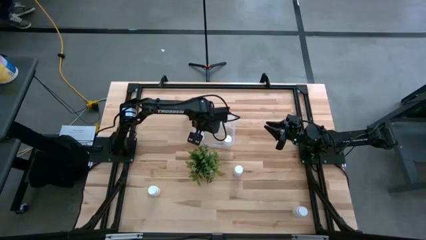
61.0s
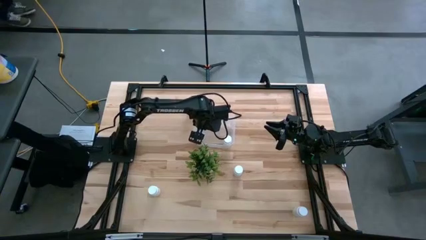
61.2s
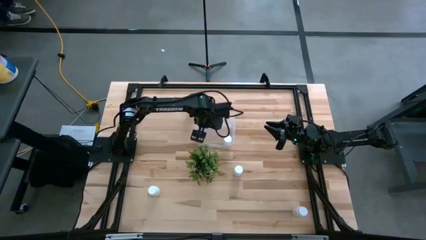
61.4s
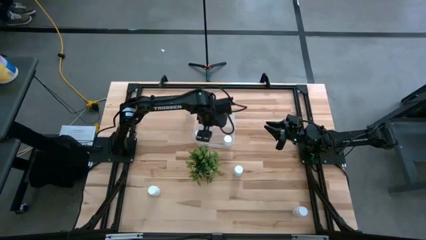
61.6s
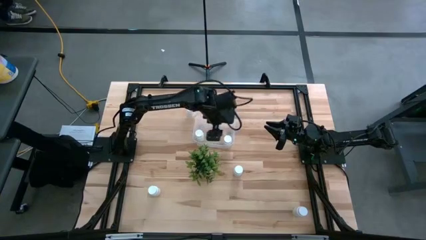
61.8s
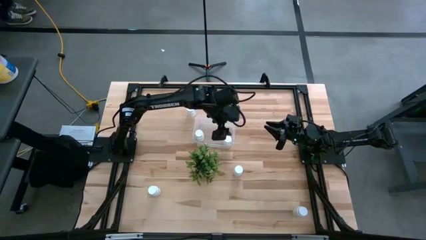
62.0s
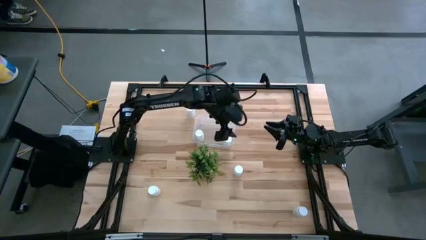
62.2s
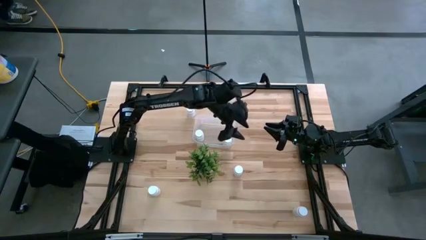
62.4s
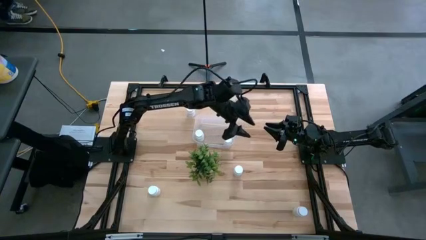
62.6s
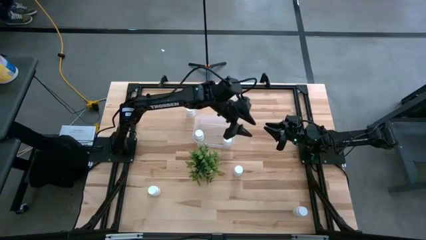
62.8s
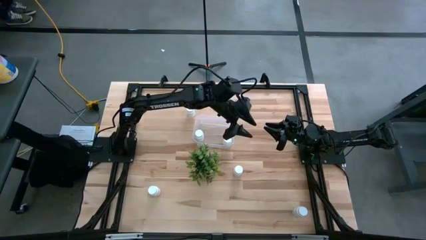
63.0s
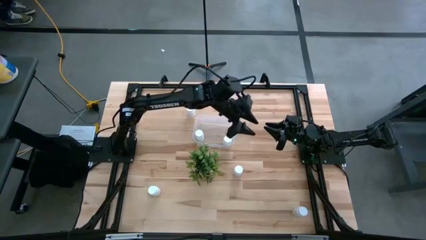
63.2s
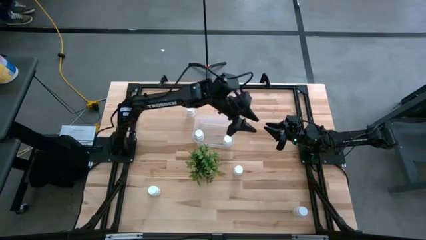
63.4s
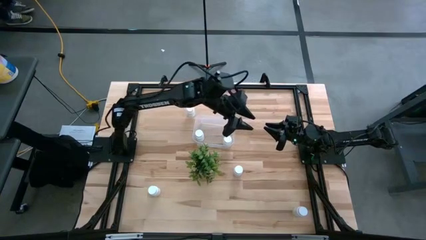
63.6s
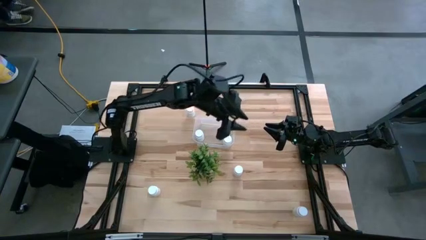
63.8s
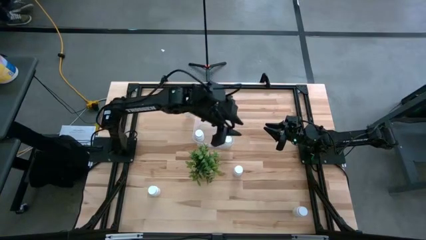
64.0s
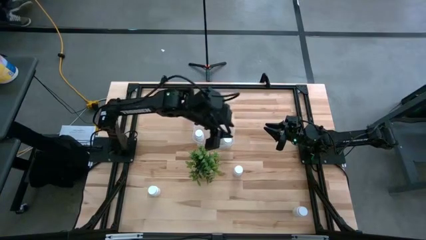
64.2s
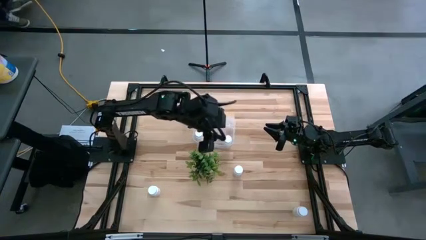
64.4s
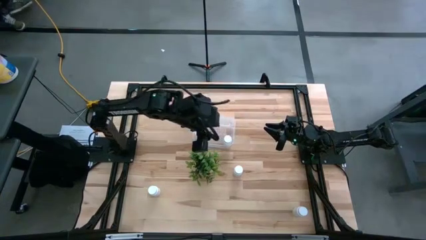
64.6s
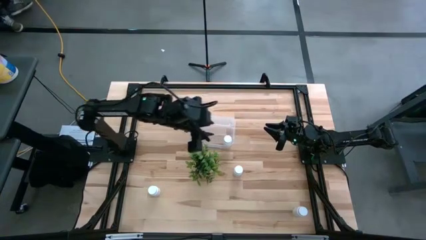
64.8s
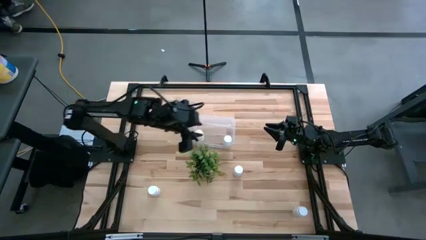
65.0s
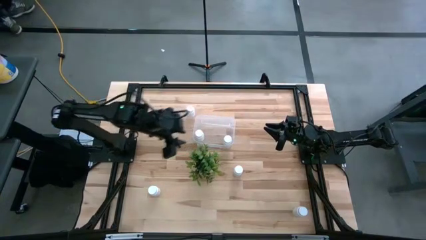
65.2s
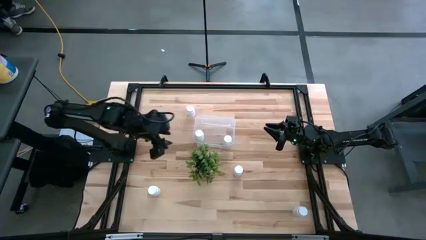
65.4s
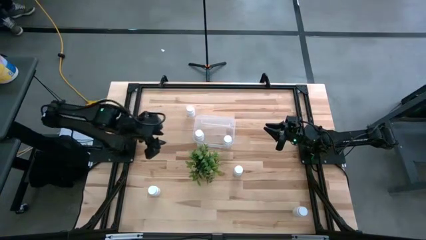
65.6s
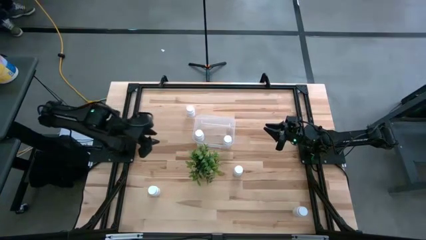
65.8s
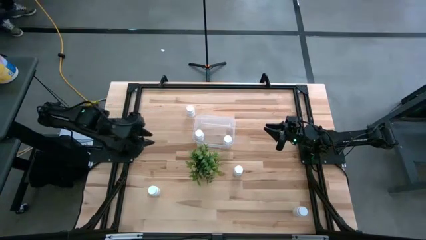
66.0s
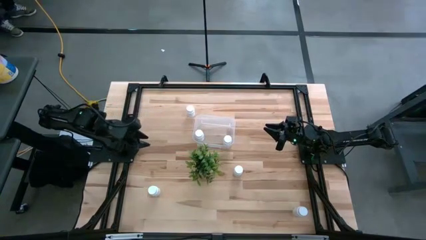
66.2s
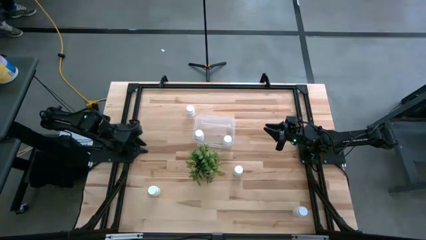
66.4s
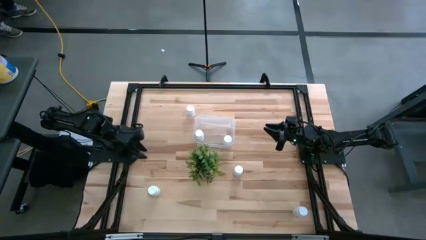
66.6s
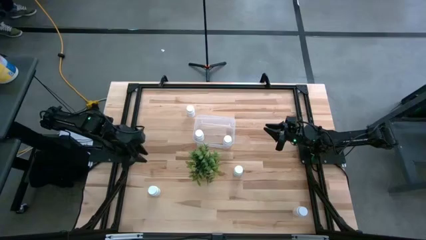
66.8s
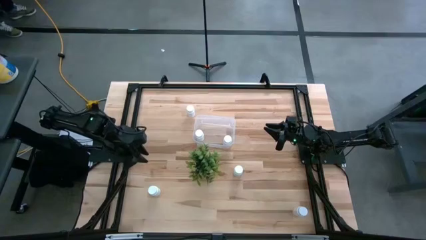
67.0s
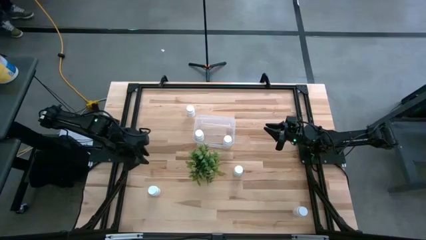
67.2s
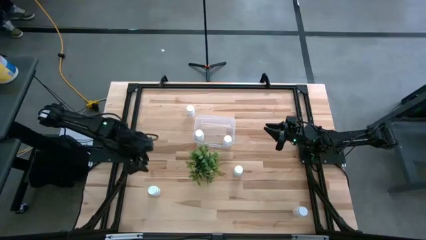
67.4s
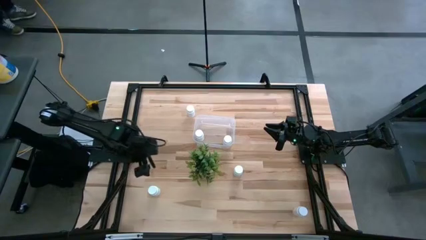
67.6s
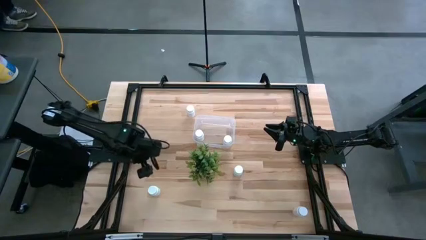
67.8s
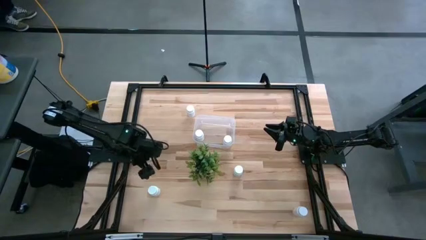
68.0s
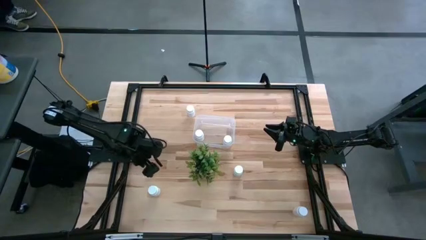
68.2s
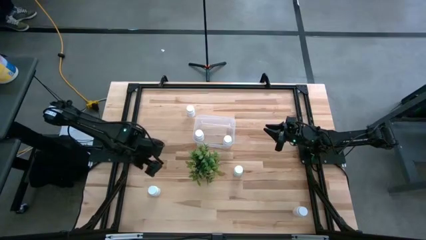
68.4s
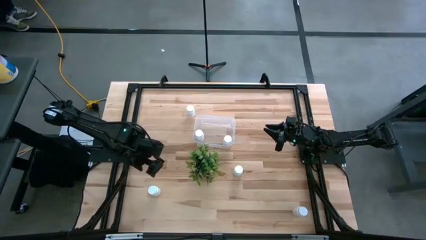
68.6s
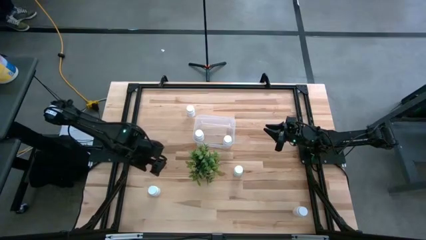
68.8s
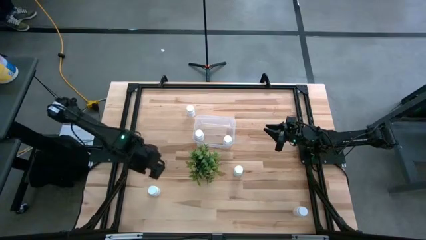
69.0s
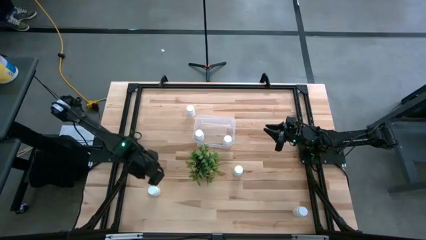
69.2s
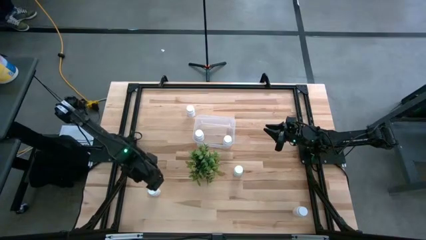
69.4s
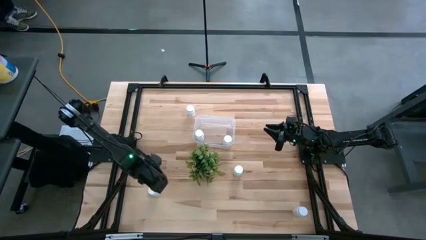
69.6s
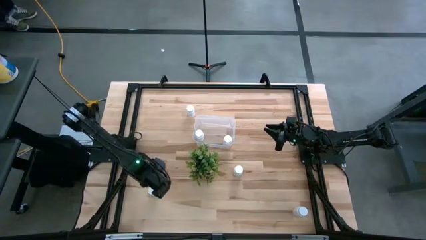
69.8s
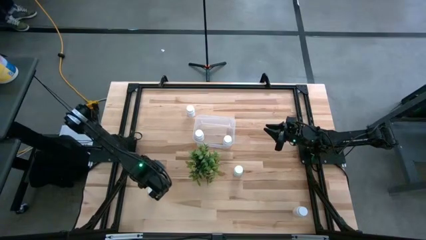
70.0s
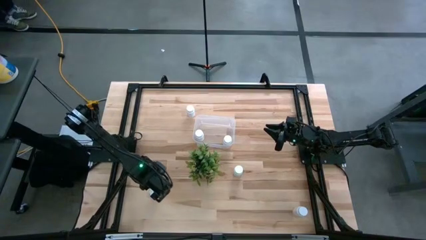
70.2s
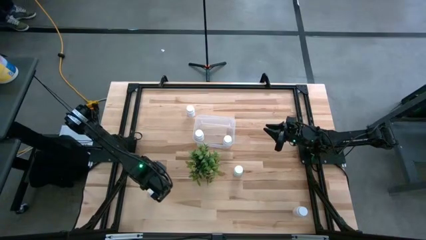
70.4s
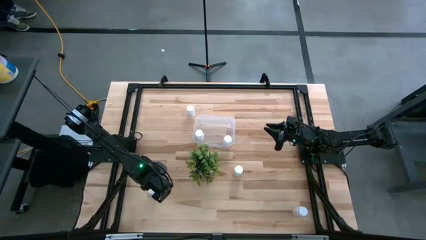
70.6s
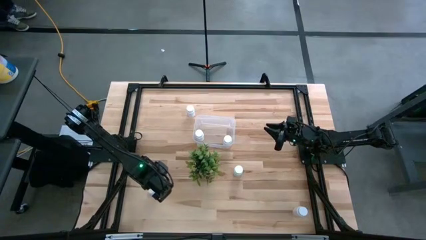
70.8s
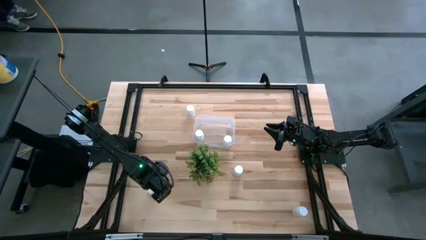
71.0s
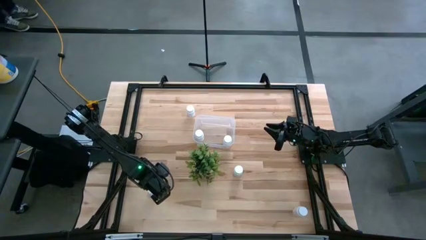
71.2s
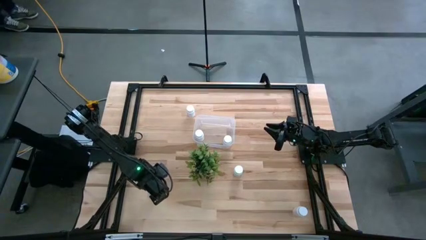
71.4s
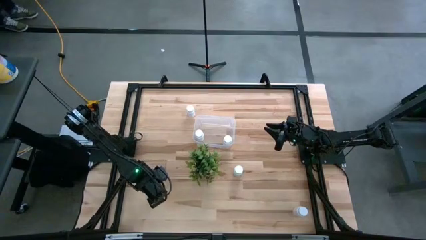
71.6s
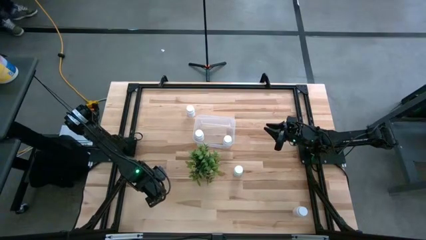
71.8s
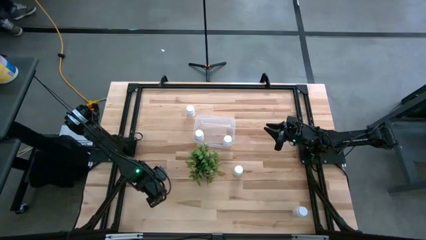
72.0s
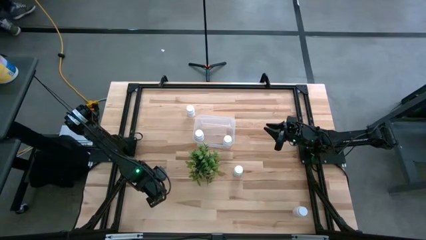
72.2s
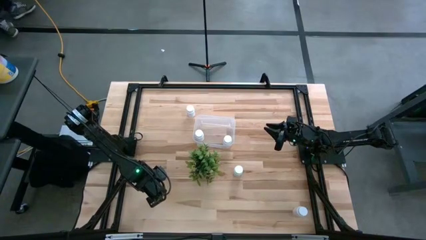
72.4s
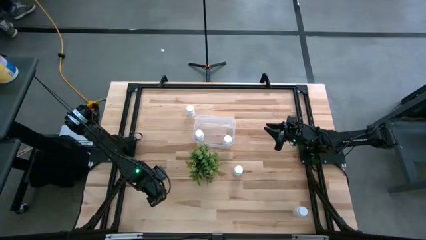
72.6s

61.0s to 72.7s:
Task: Pick and place pill bottles into a basket
Put the white pill bottle in the transparent bin
